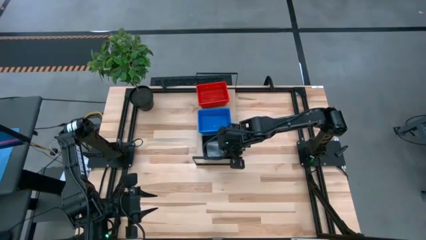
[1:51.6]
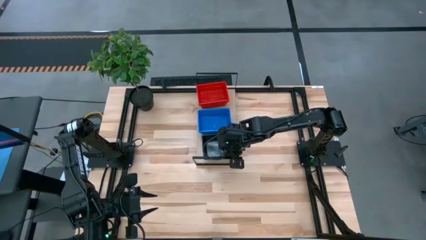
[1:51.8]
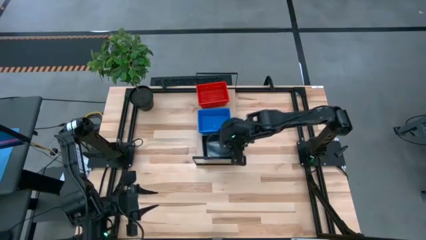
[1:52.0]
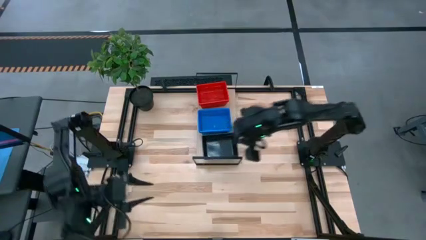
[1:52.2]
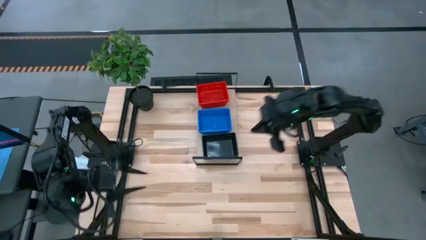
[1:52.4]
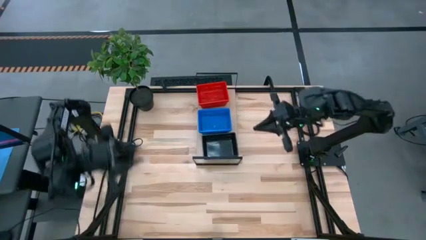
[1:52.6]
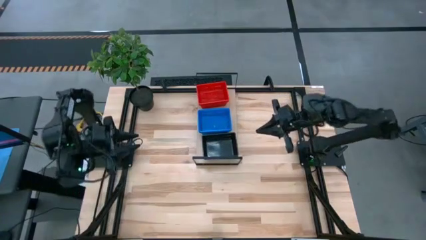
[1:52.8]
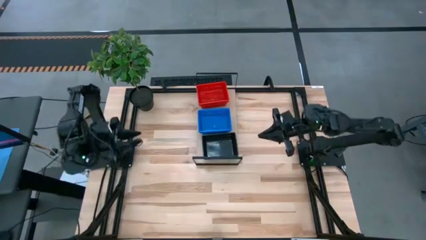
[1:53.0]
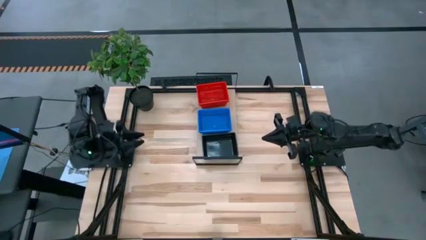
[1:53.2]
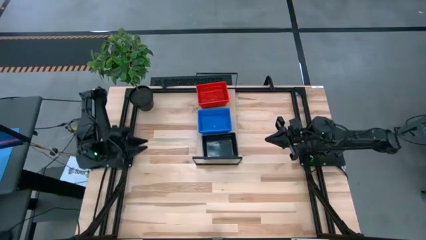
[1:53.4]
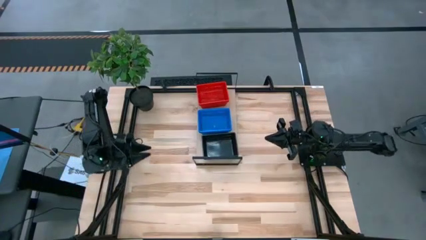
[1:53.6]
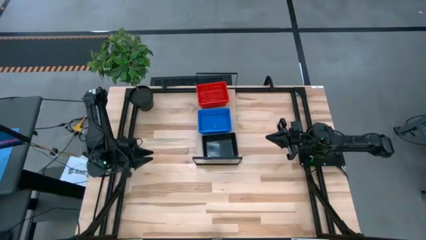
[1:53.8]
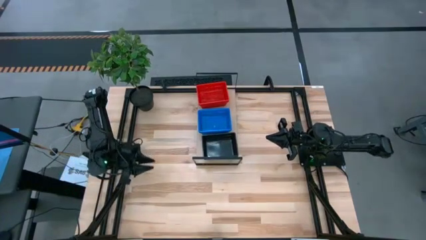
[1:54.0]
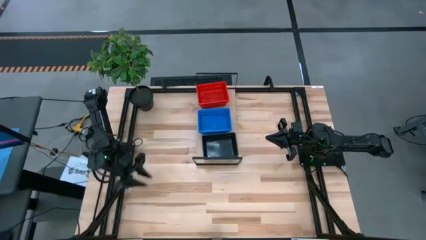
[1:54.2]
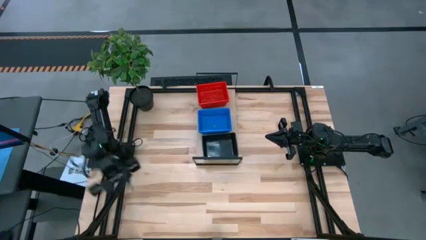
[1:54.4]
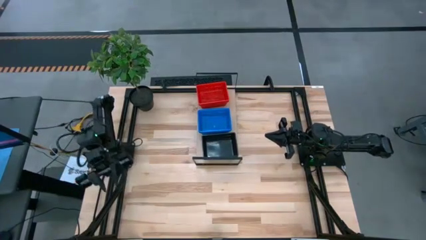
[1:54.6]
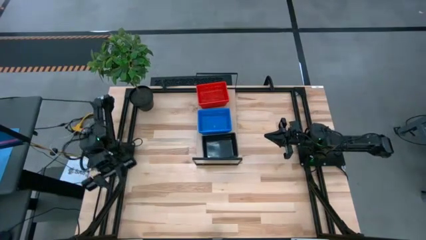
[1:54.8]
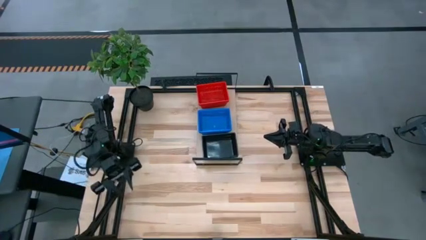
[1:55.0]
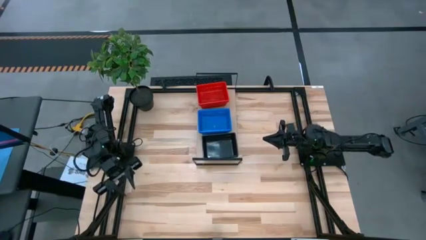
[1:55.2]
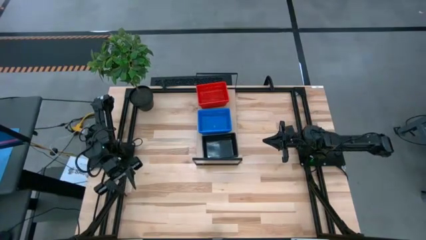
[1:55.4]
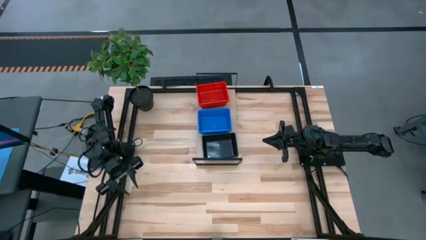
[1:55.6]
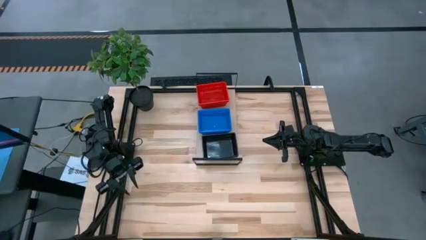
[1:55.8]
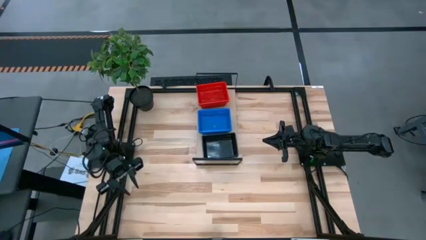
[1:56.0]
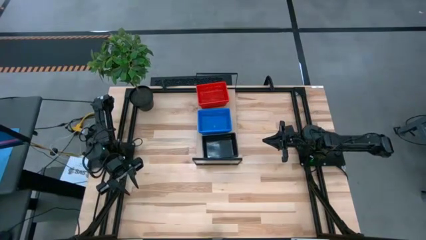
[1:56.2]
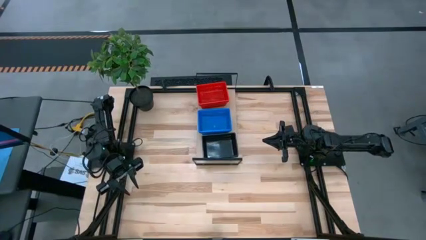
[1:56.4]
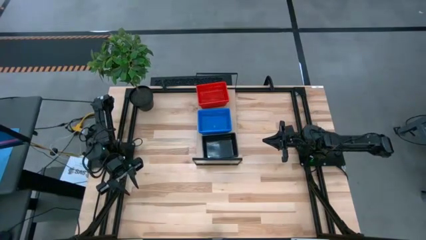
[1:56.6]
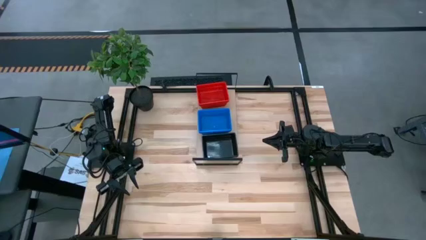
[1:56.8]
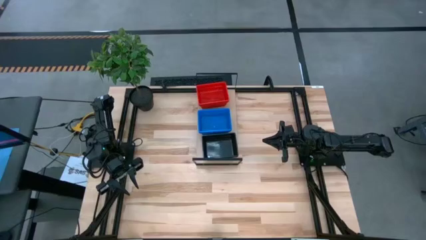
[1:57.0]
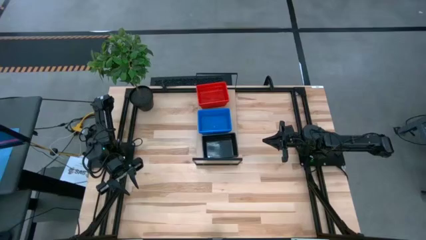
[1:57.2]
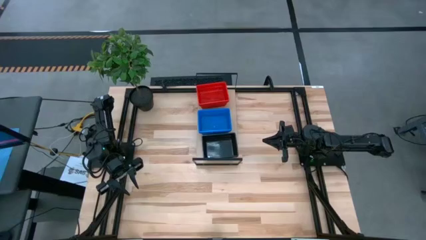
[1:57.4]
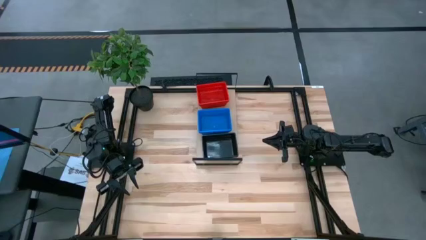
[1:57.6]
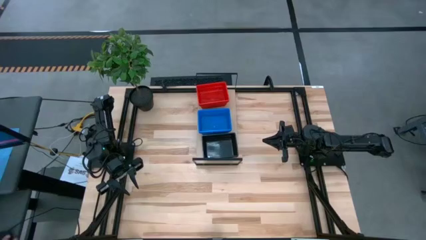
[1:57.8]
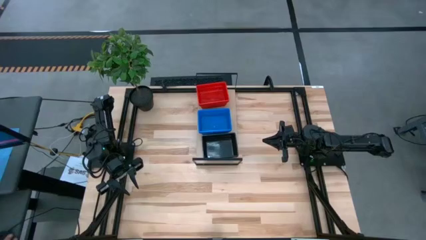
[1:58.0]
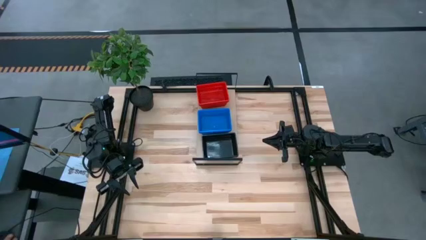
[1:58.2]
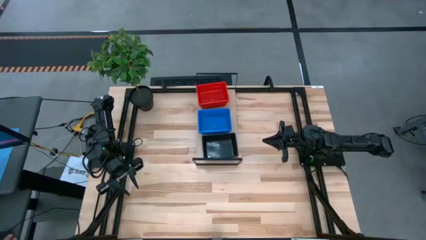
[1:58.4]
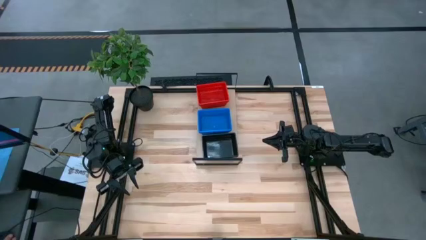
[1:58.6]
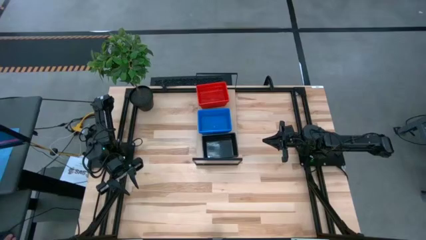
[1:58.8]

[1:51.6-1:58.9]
Task: Stack baskets on shelf by color
Return to Home Position

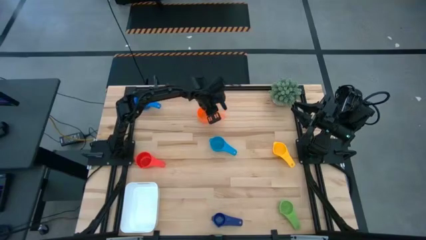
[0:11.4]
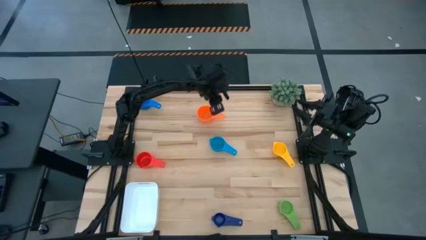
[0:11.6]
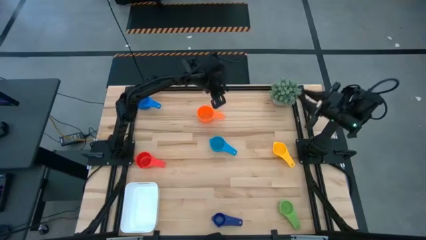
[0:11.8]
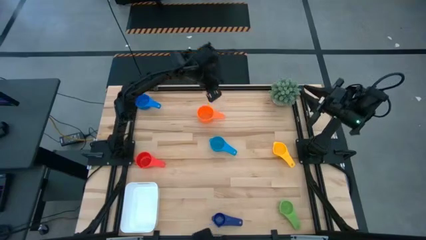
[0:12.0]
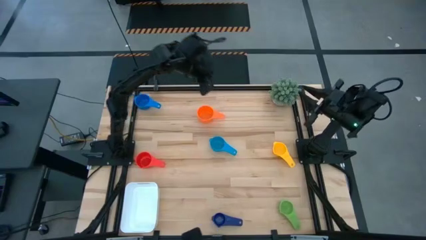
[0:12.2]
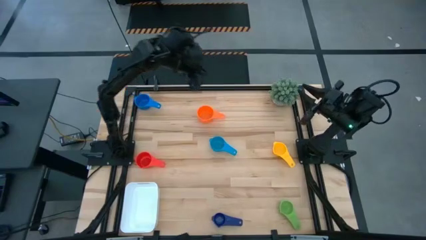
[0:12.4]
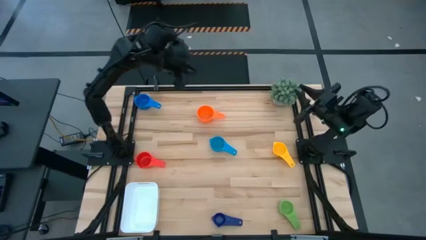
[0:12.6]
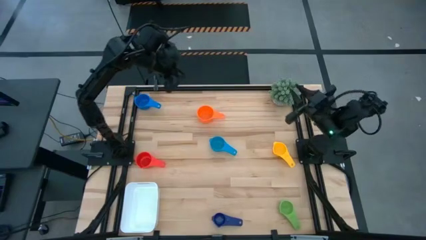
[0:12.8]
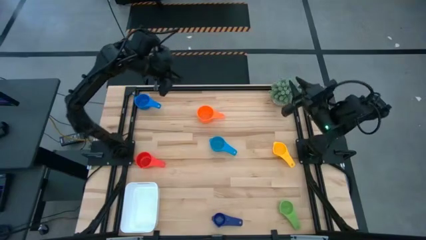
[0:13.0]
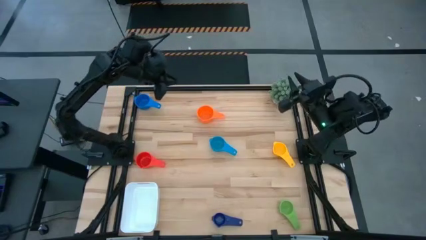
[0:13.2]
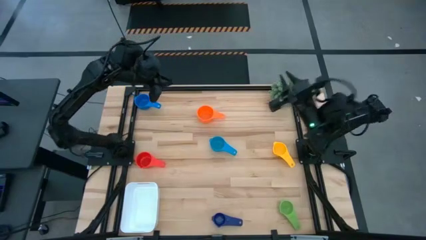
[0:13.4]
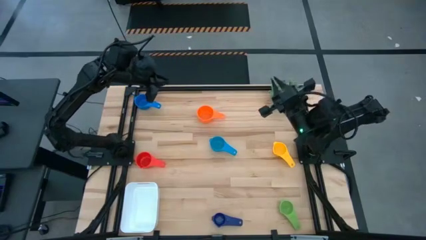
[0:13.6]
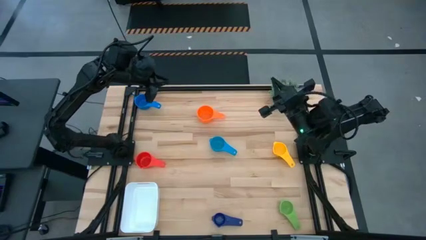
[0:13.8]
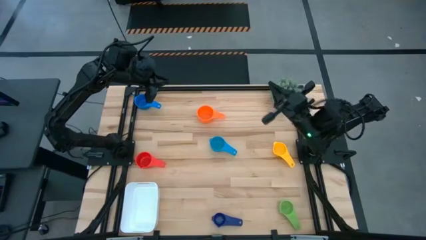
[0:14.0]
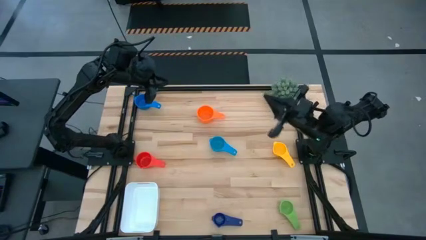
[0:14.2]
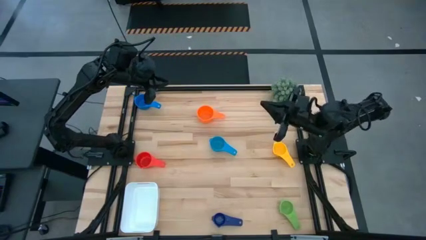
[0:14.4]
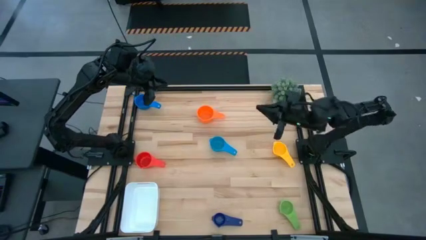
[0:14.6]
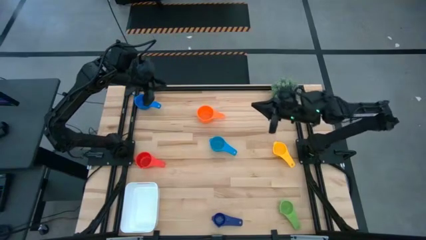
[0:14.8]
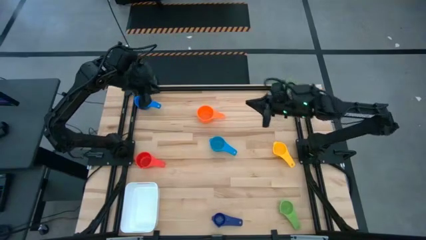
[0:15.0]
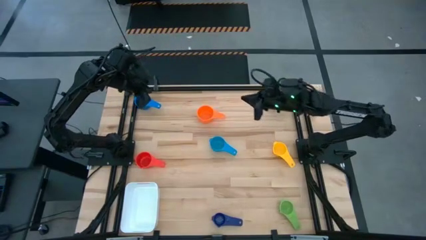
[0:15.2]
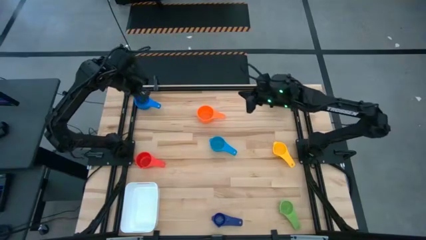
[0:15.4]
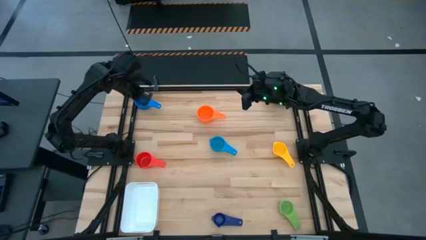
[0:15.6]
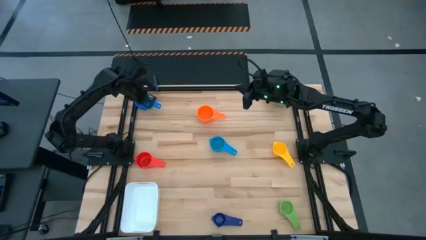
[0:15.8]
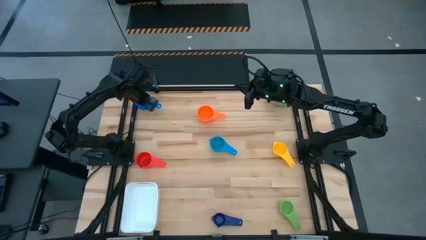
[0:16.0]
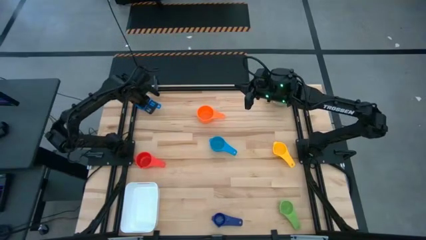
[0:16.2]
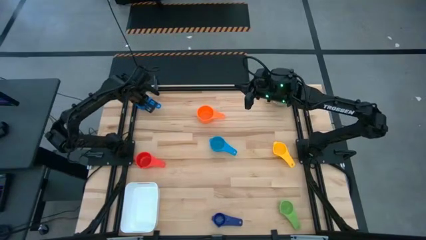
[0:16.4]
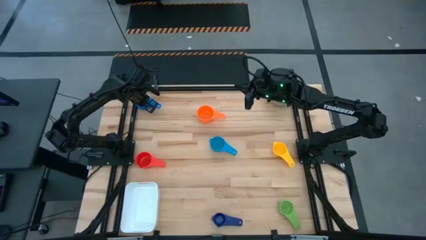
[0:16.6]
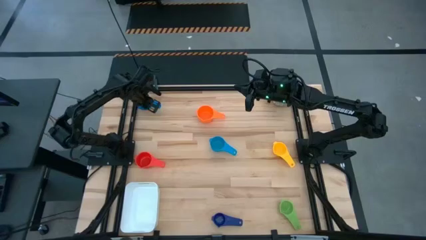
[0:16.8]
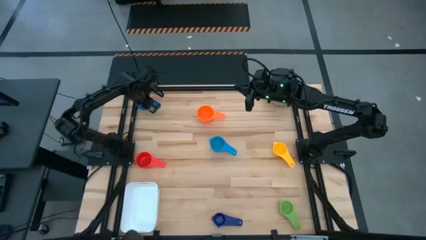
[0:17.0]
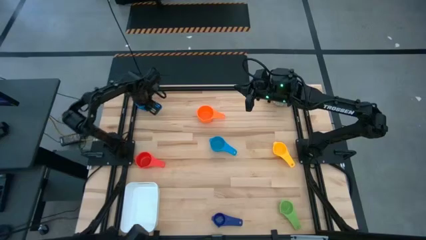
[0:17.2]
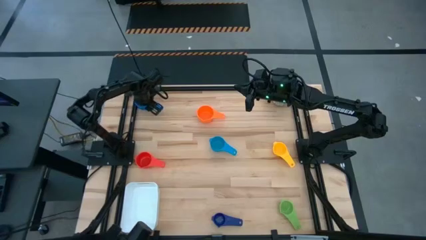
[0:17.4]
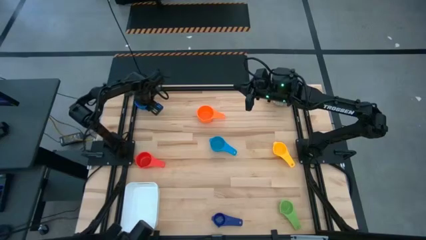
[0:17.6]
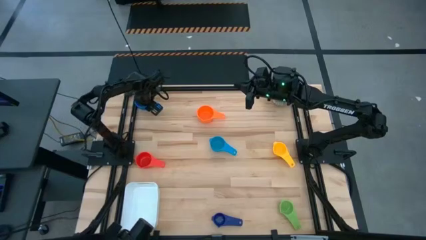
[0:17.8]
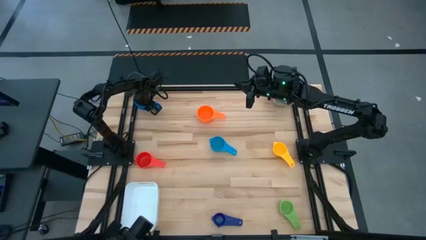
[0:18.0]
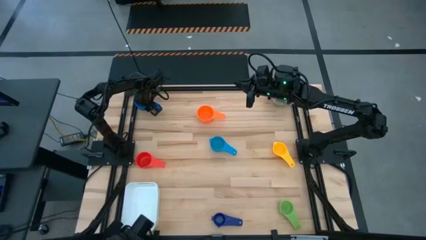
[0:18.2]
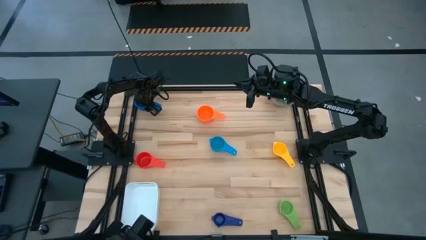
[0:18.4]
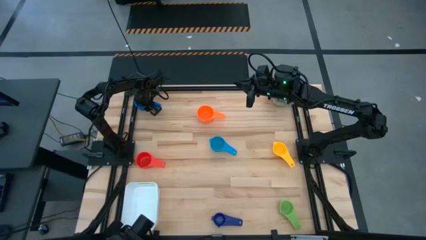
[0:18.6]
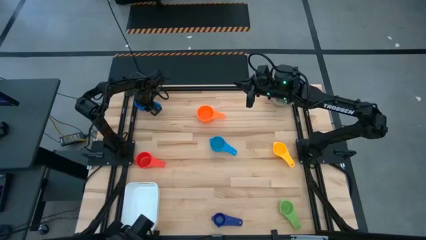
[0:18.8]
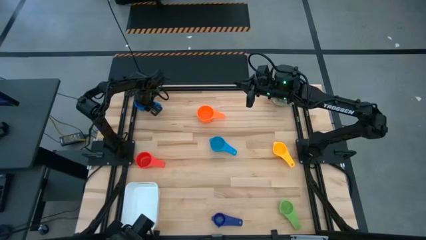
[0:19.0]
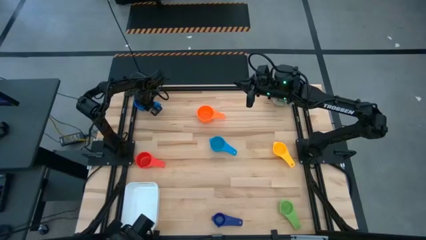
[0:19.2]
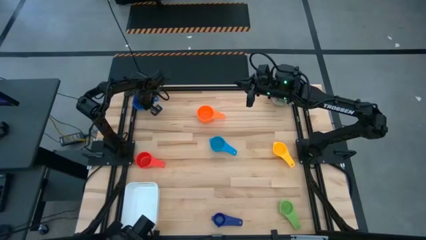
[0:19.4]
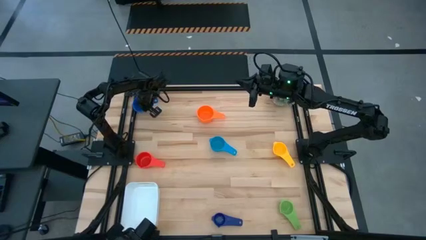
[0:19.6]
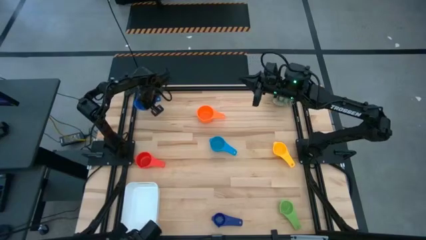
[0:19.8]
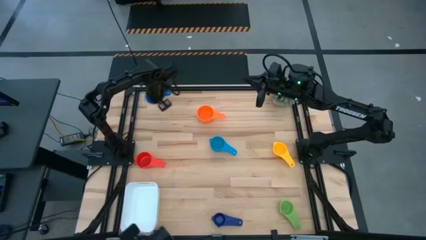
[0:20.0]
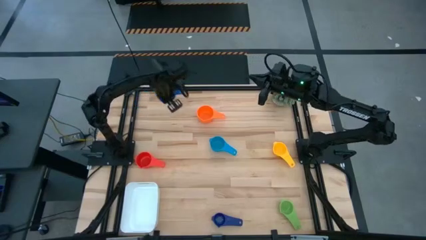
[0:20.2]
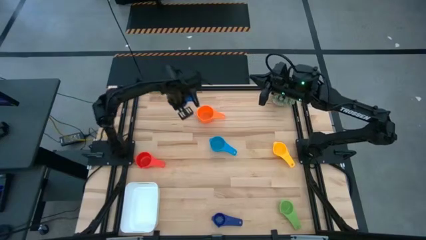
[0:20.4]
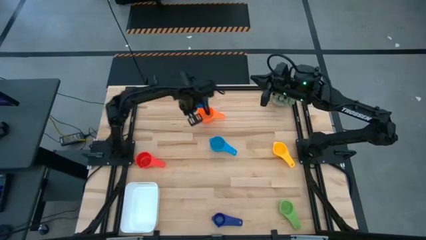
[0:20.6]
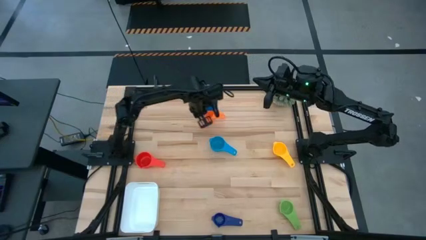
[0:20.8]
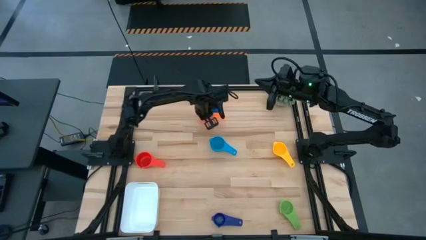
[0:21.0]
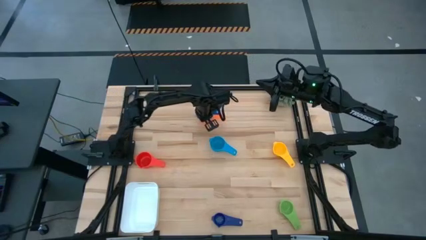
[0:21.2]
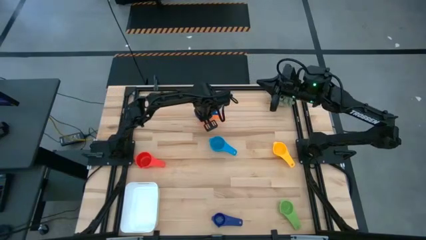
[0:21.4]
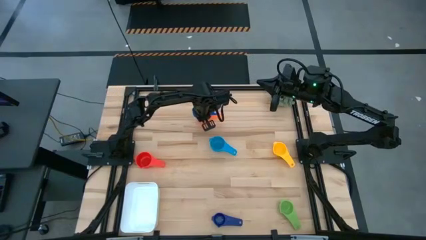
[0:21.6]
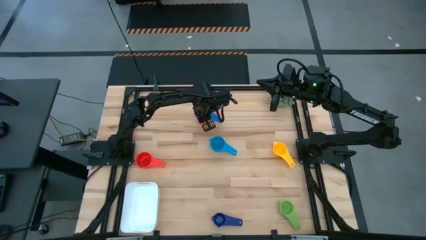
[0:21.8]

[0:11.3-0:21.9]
Task: Nest measuring cups in basket
Stack the blue measuring cup on top of the orange measuring cup
